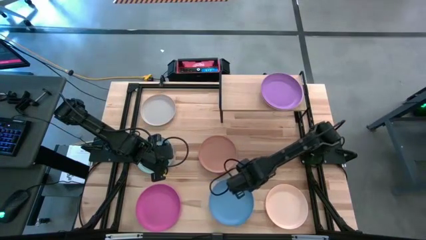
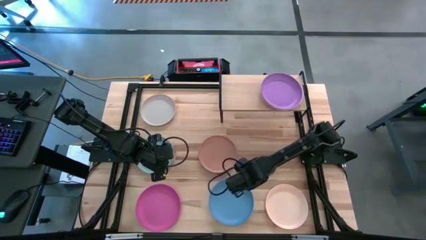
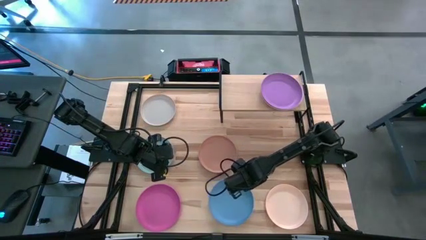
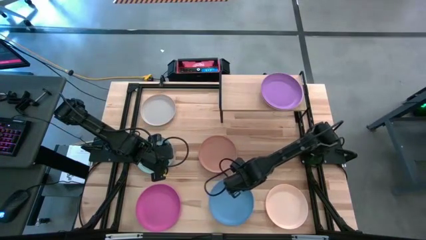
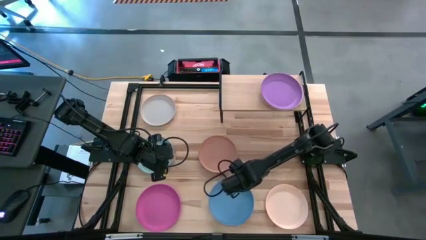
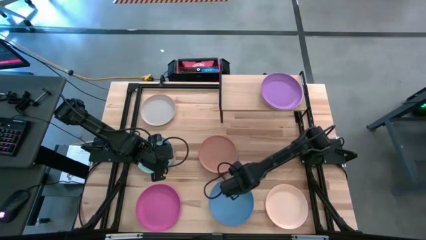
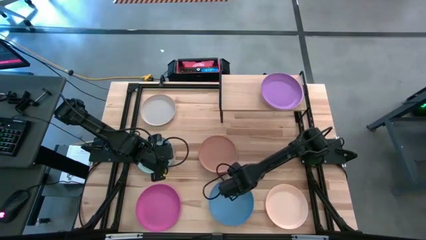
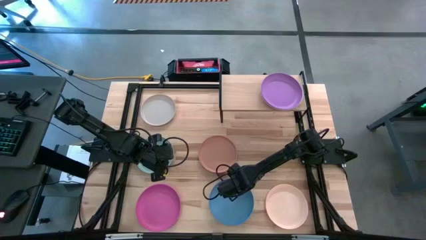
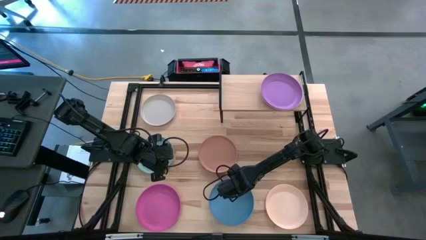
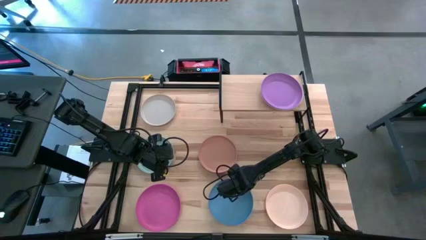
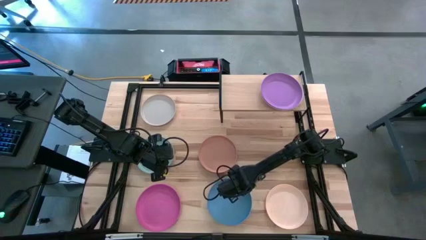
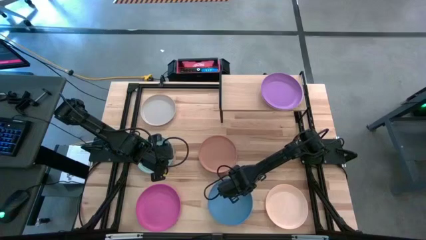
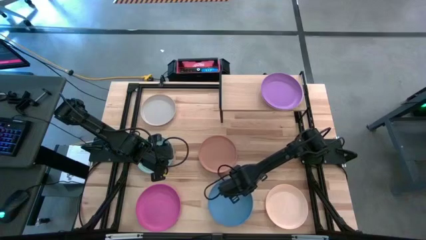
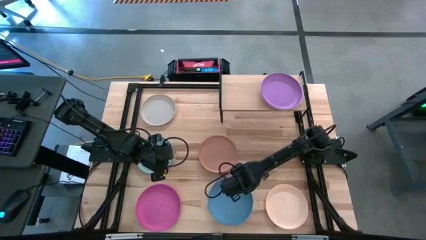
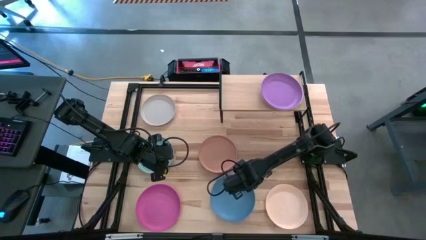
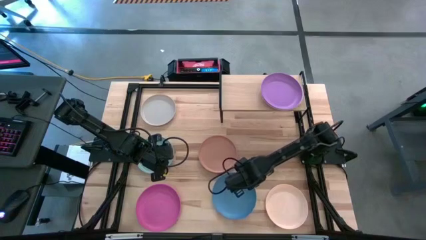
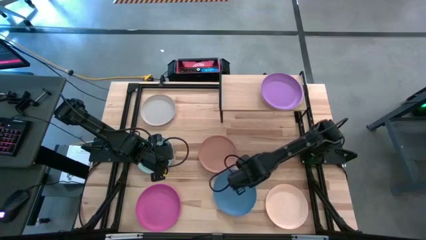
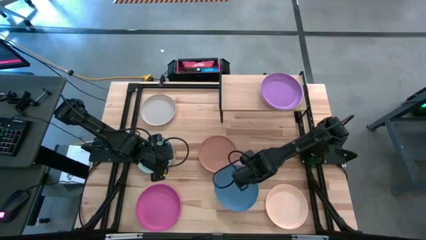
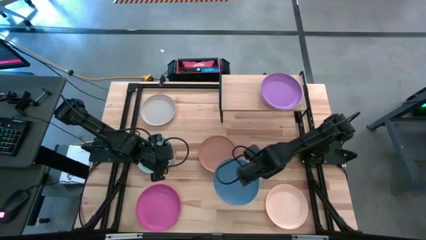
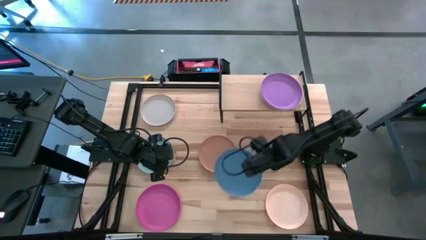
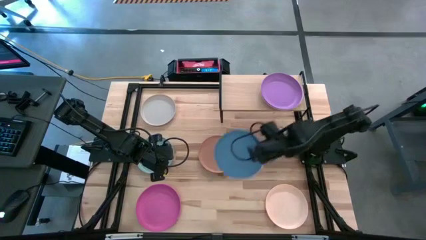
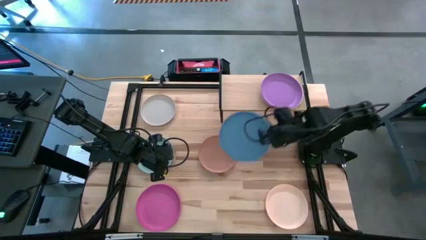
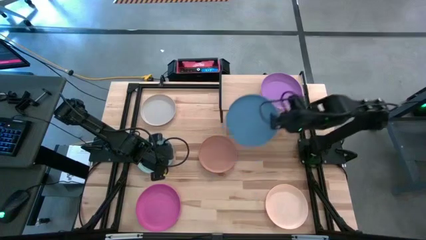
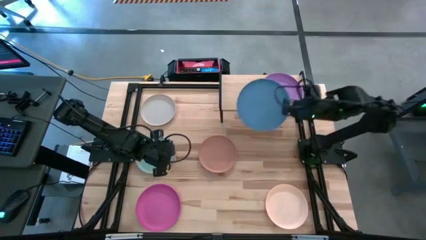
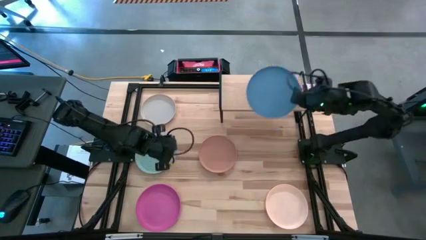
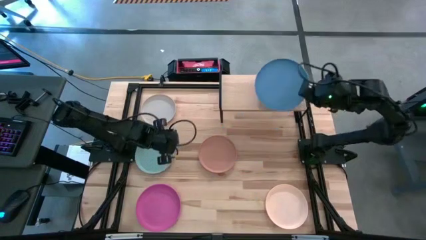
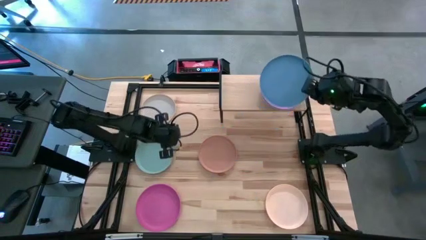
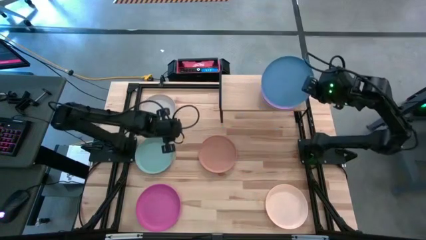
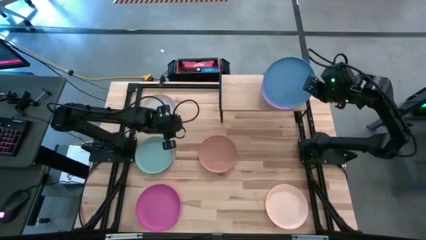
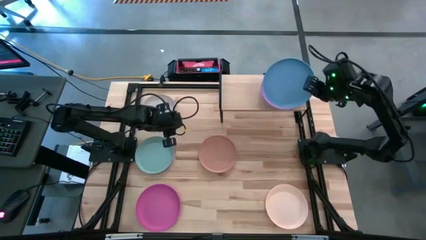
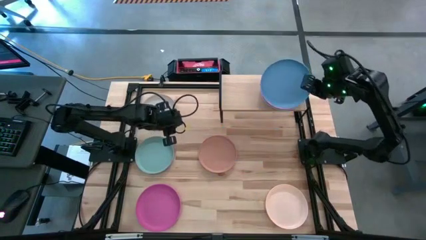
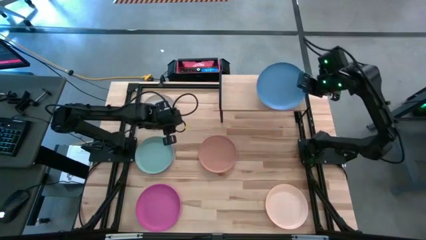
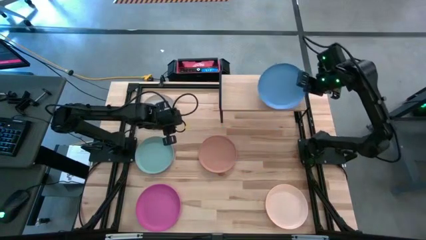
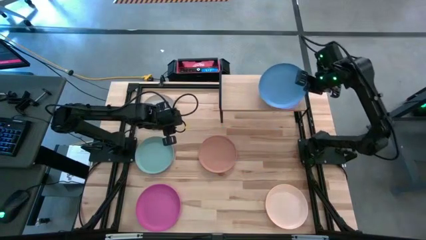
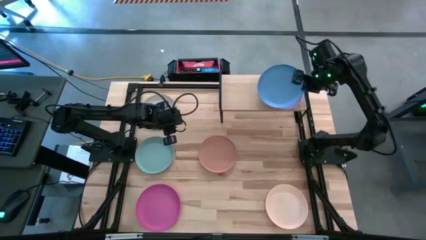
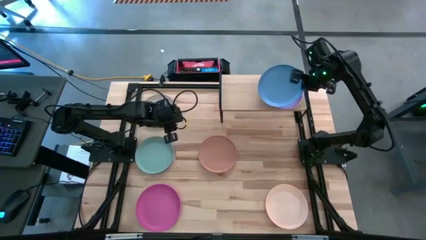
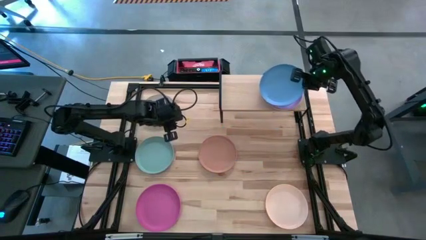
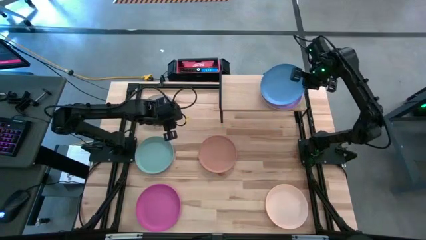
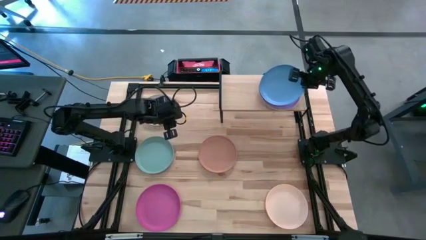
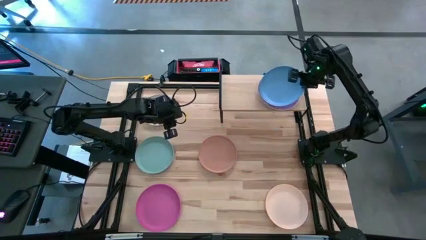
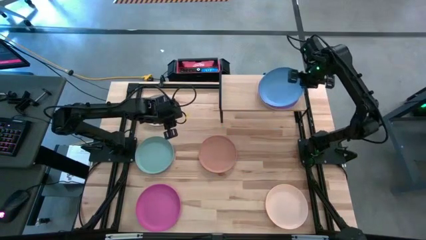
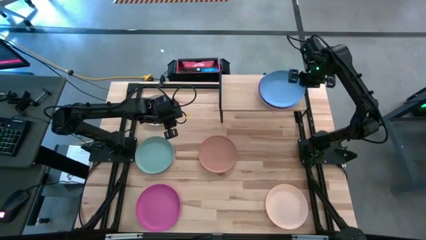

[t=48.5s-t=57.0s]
Task: Place and stack plates onto a shelf
Stack the blue plate on top of the purple plate on the shelf

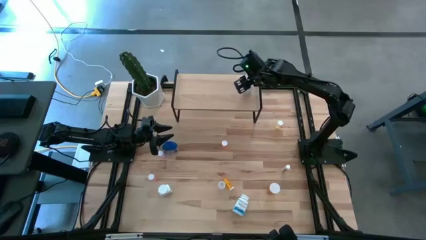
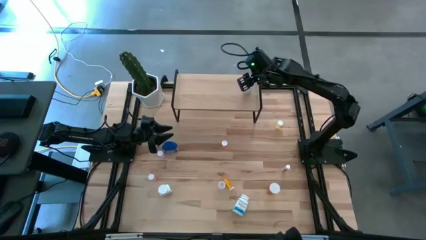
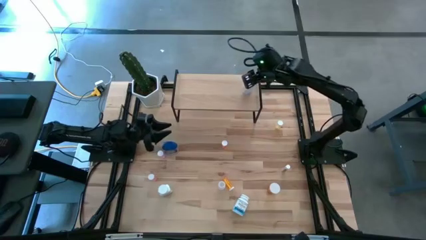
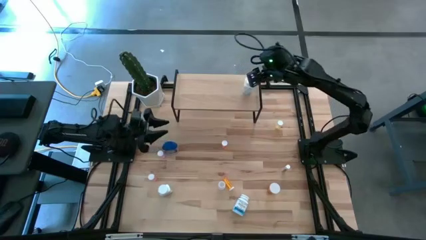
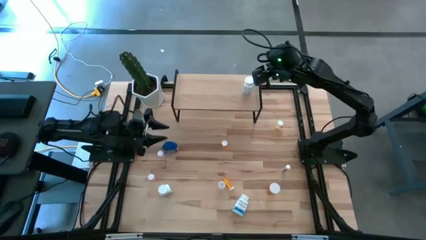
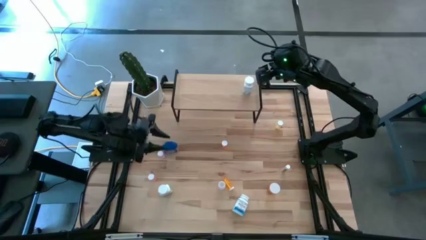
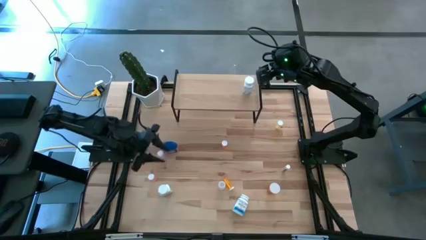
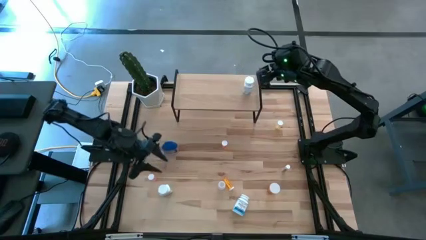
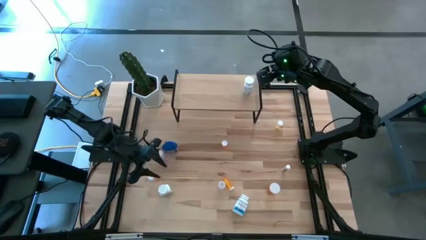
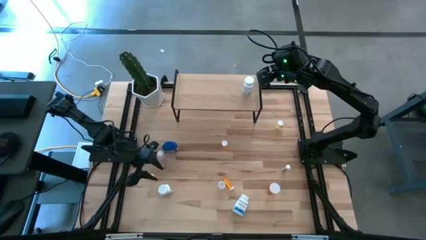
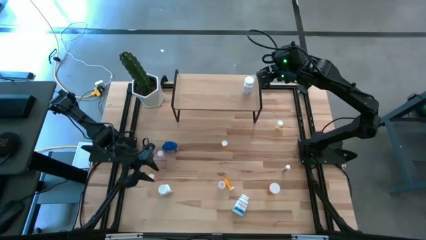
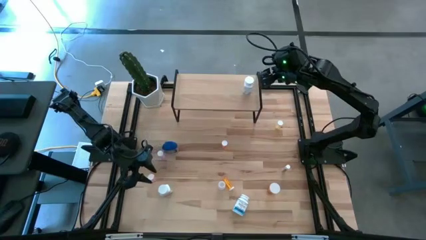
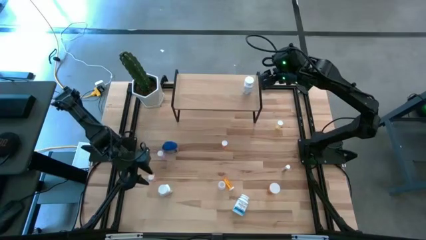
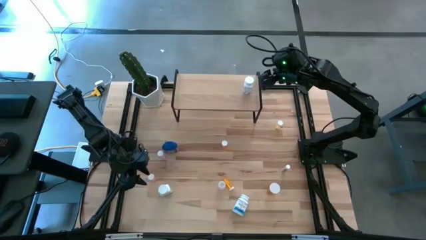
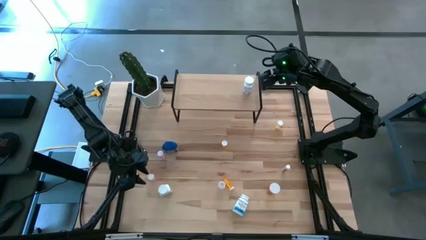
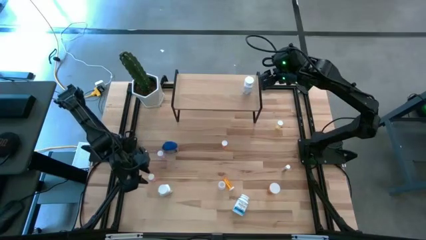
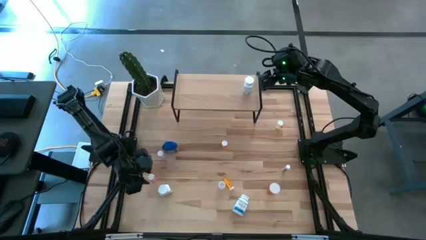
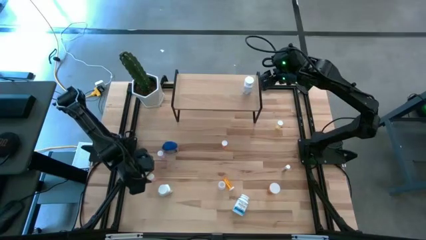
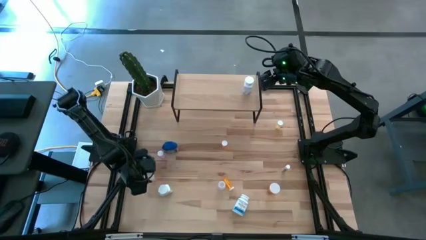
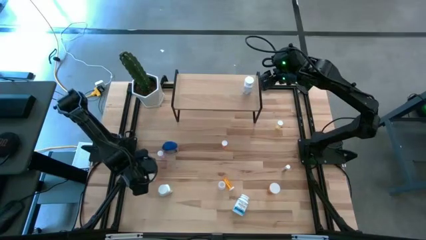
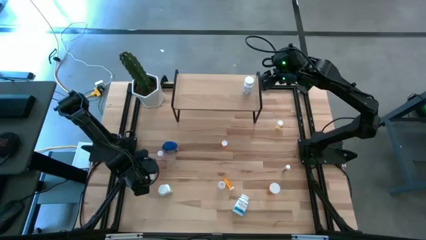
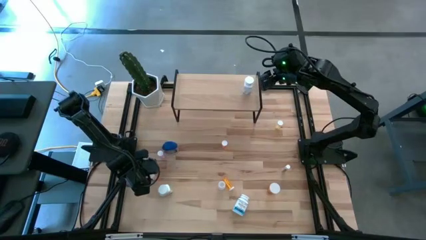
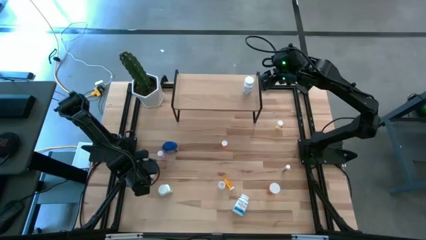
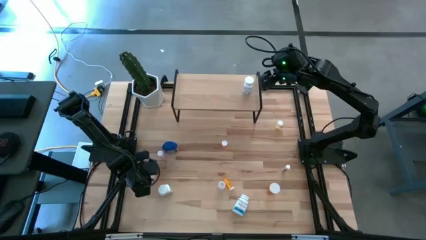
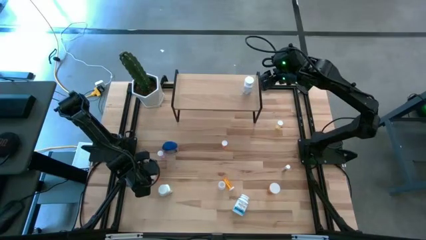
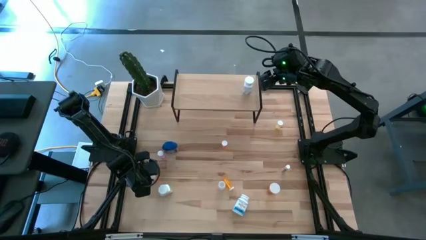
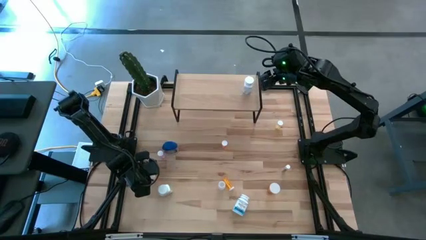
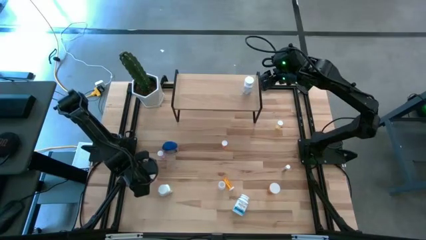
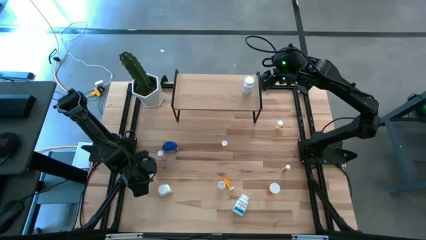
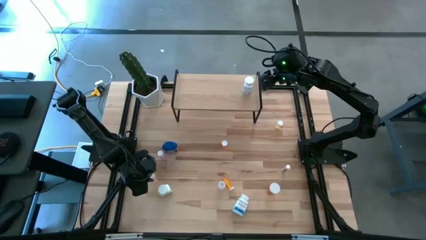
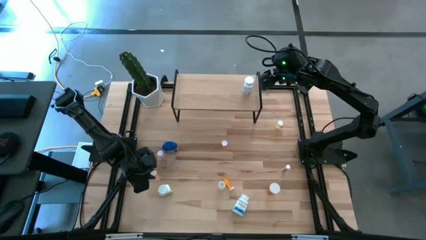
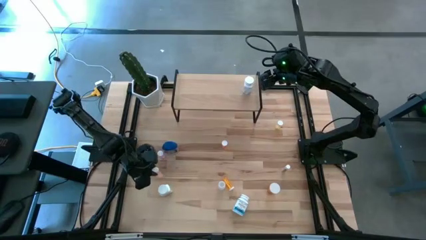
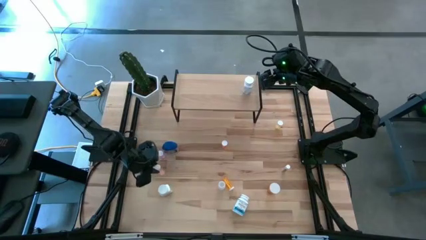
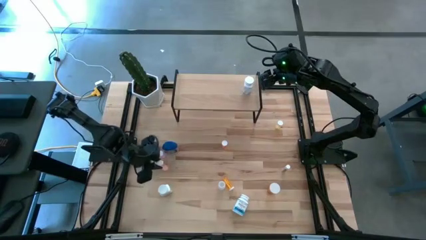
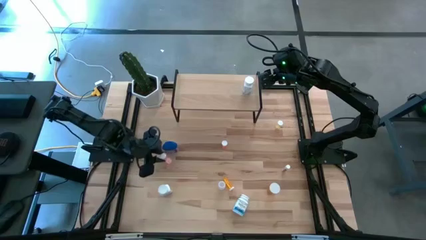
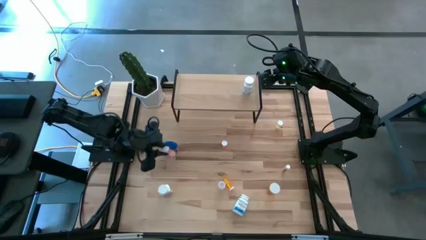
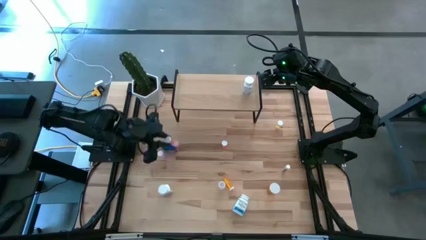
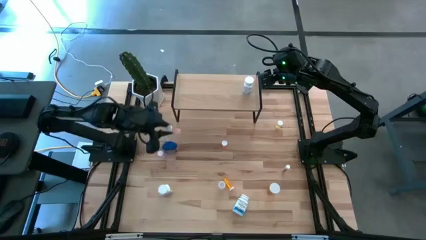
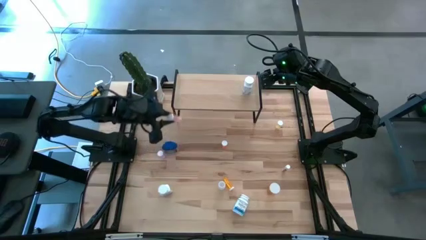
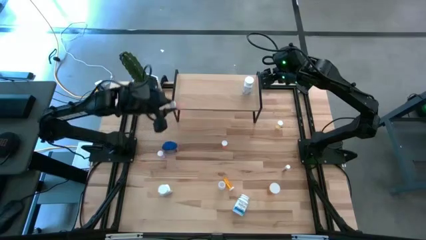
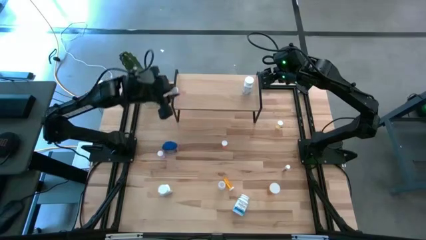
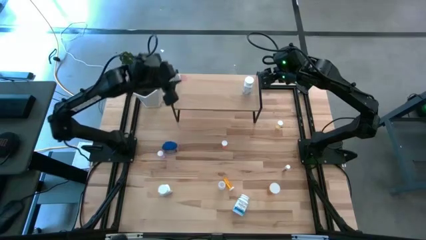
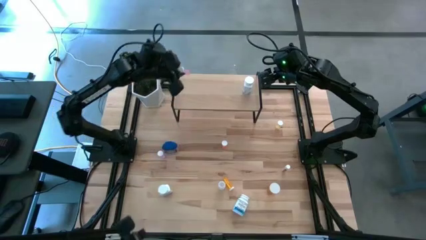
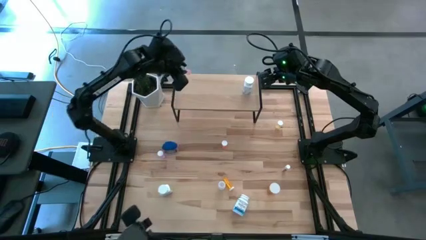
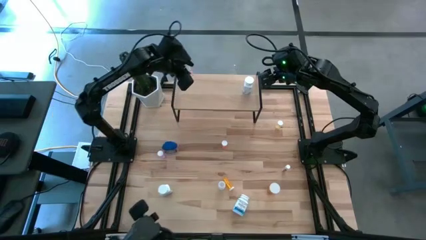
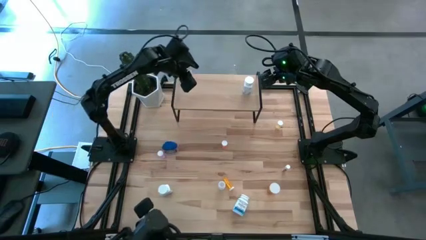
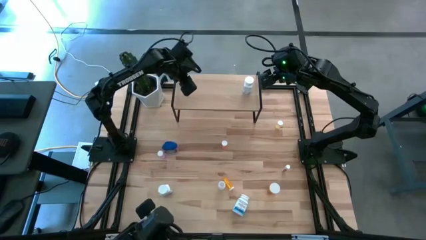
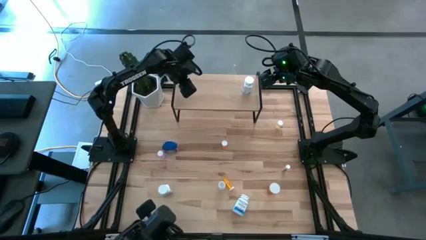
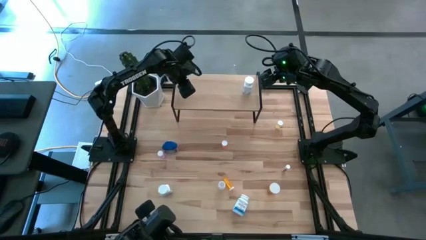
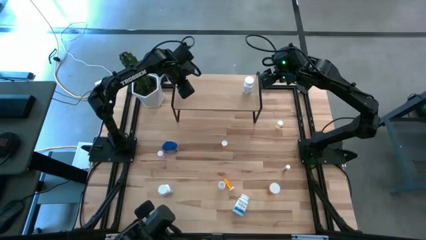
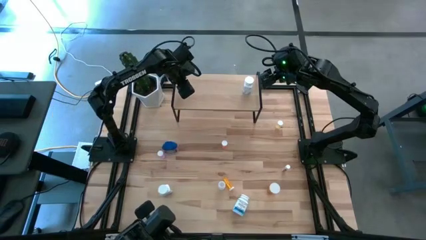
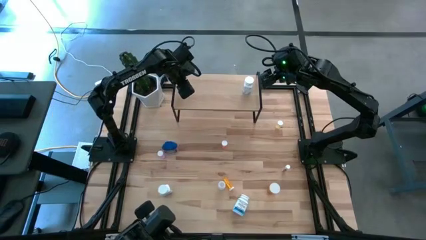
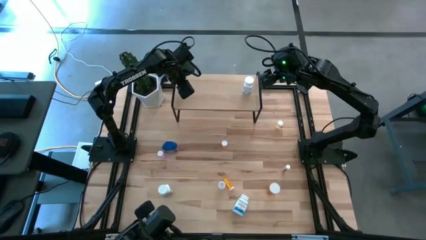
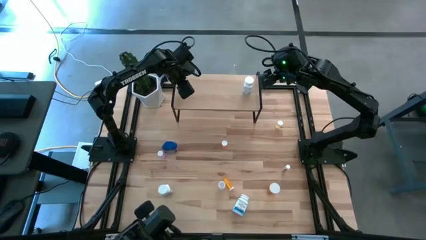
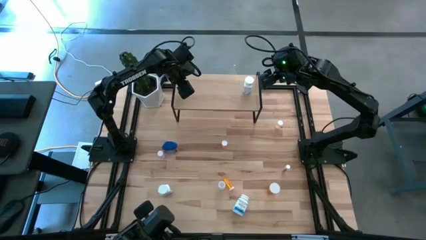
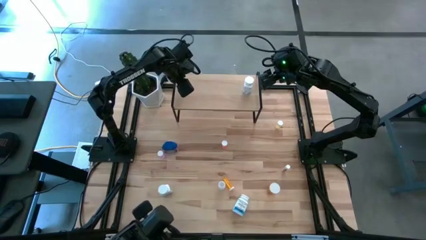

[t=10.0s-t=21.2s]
Task: Pick and place medicine bottles onto shelf by color
Put the bottom small pink pill bottle on the shelf
